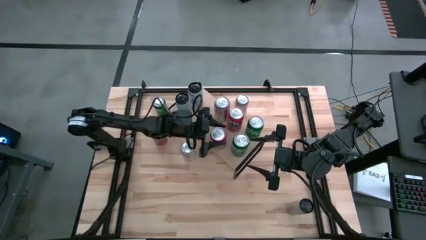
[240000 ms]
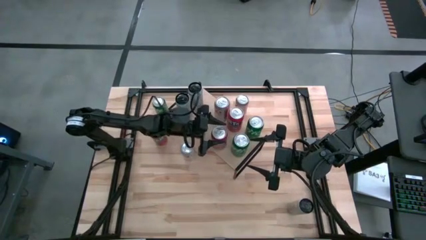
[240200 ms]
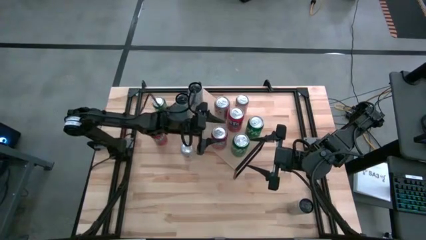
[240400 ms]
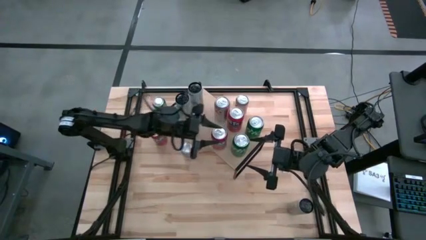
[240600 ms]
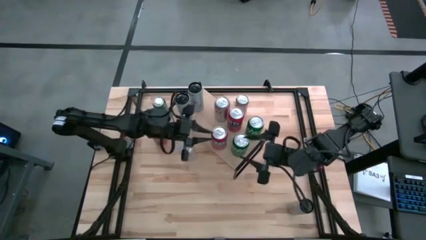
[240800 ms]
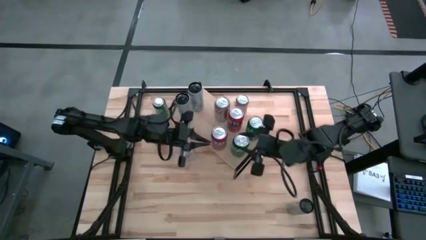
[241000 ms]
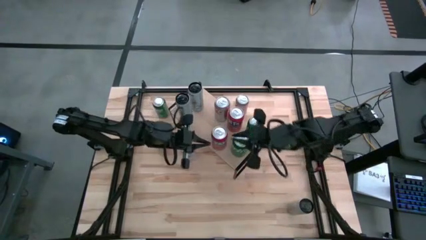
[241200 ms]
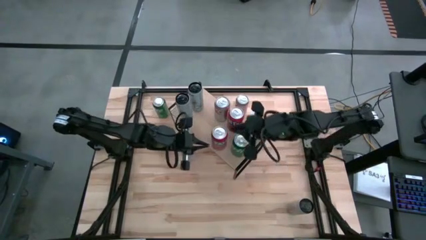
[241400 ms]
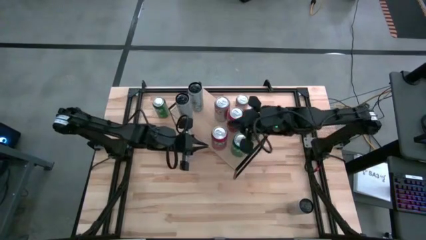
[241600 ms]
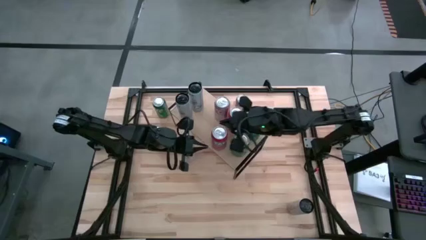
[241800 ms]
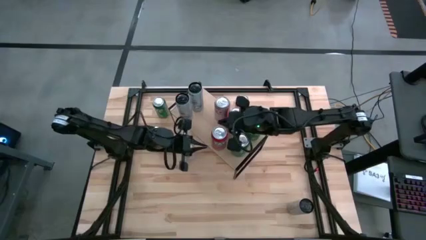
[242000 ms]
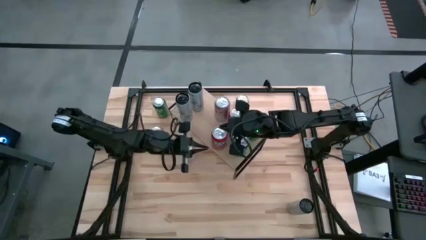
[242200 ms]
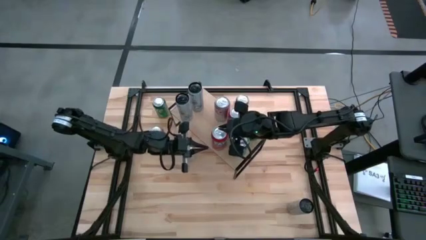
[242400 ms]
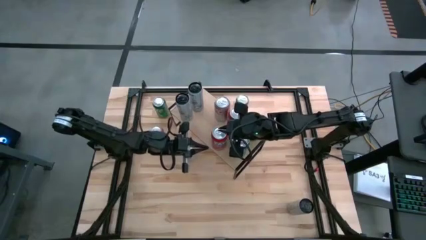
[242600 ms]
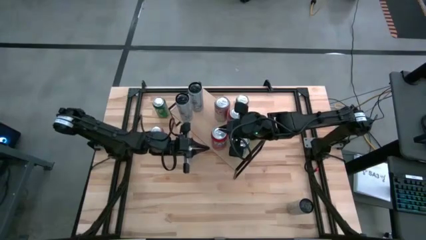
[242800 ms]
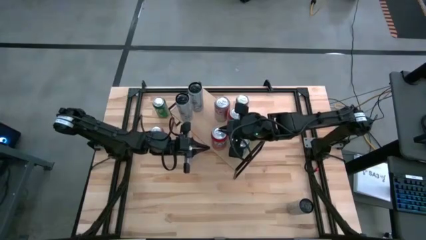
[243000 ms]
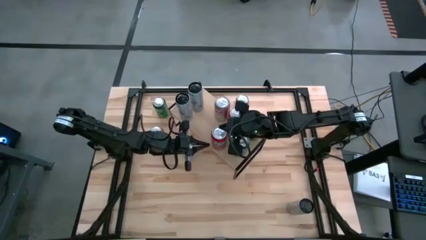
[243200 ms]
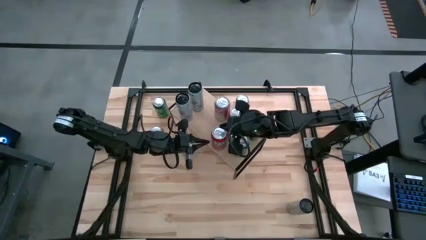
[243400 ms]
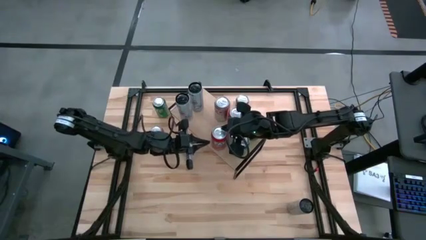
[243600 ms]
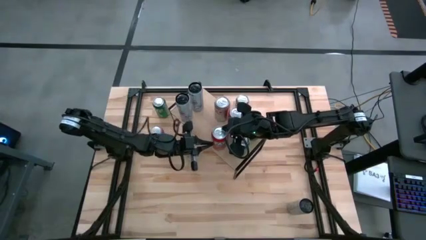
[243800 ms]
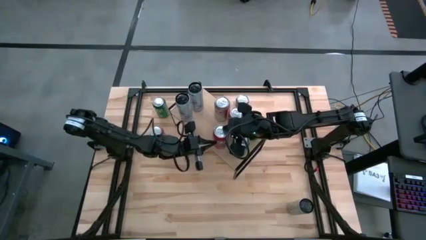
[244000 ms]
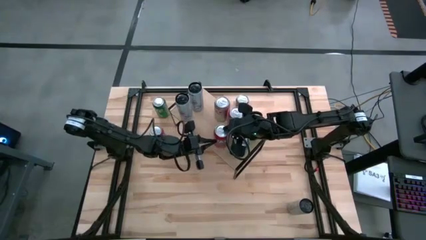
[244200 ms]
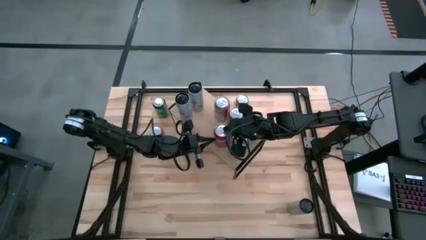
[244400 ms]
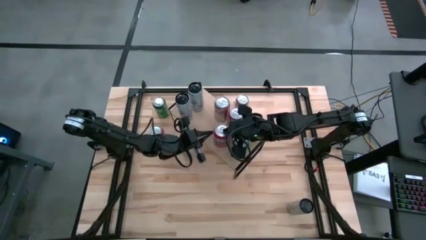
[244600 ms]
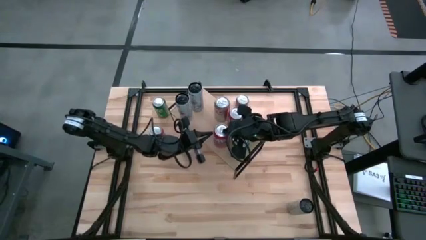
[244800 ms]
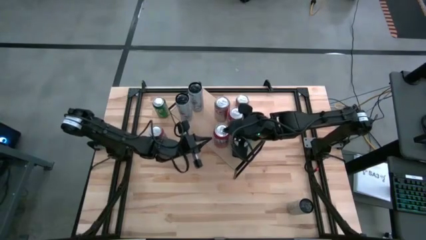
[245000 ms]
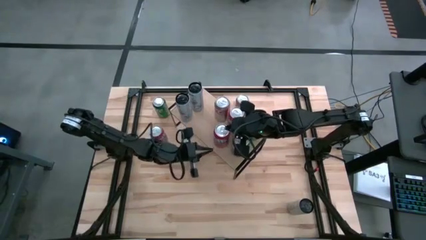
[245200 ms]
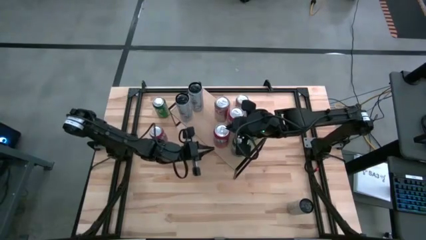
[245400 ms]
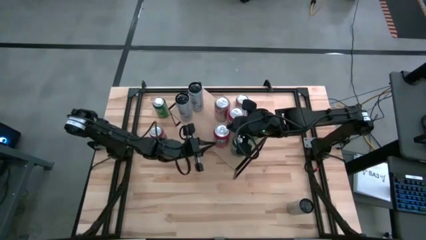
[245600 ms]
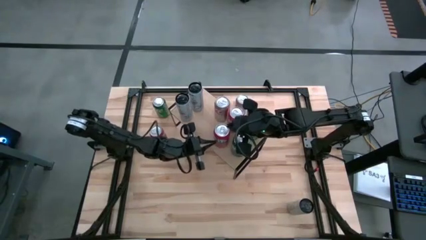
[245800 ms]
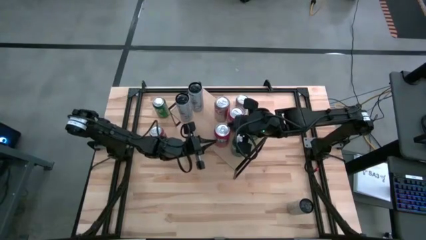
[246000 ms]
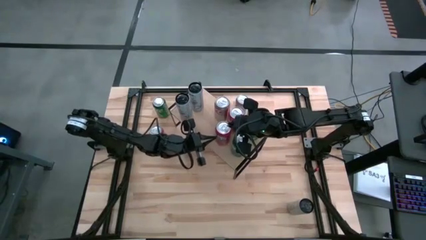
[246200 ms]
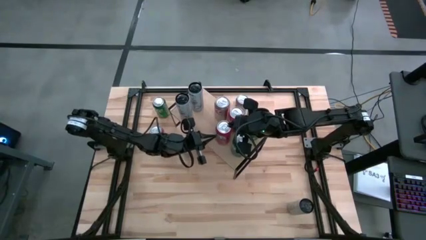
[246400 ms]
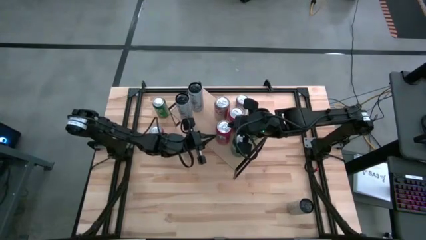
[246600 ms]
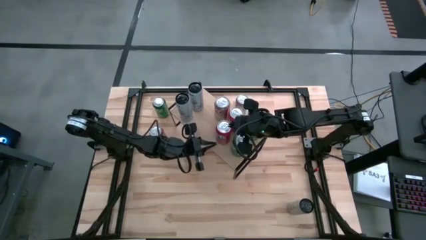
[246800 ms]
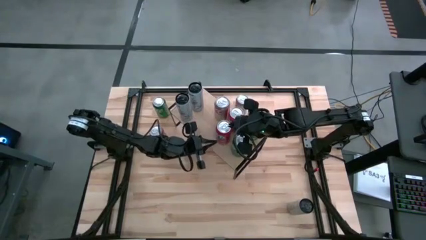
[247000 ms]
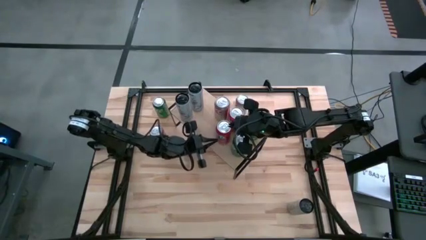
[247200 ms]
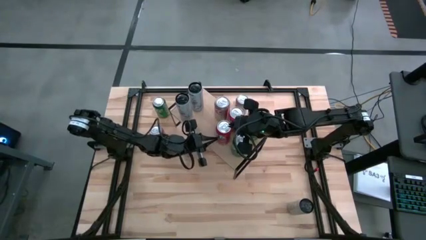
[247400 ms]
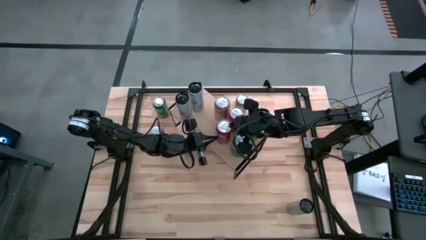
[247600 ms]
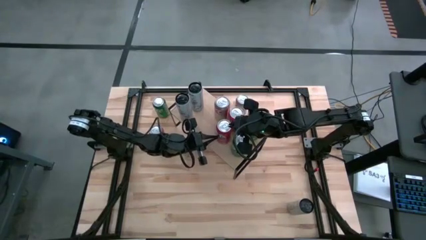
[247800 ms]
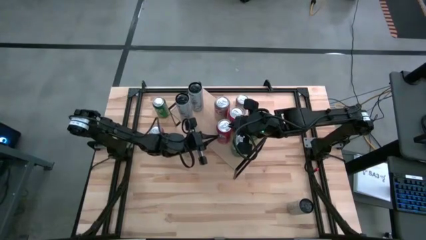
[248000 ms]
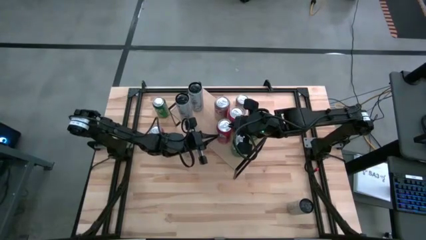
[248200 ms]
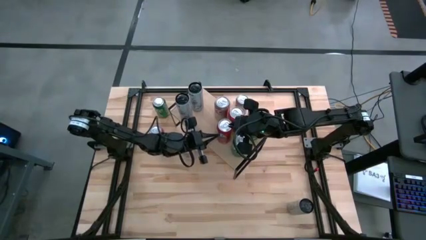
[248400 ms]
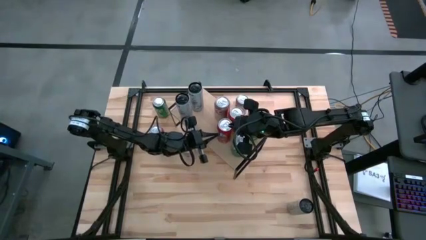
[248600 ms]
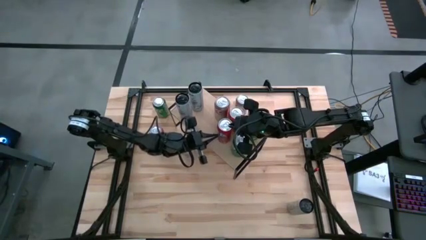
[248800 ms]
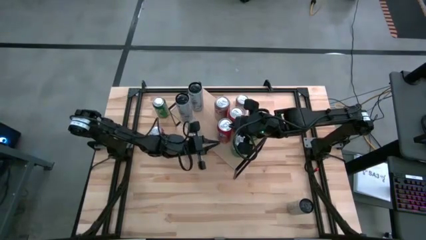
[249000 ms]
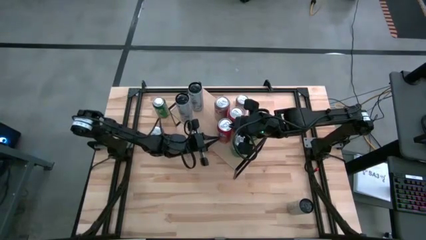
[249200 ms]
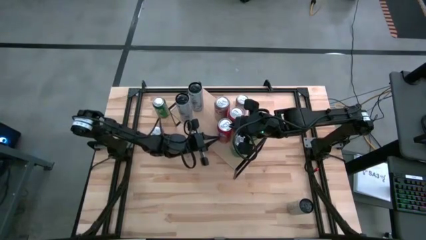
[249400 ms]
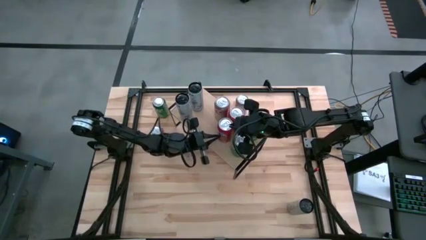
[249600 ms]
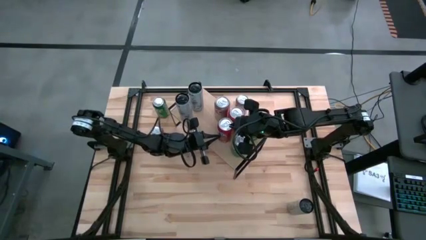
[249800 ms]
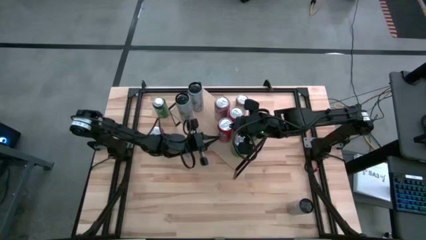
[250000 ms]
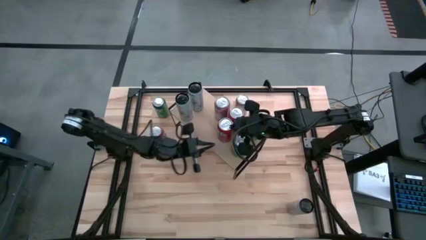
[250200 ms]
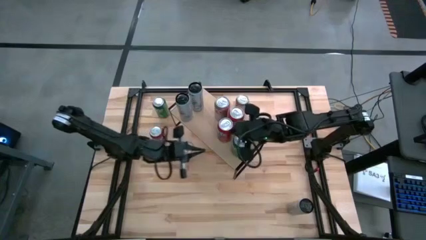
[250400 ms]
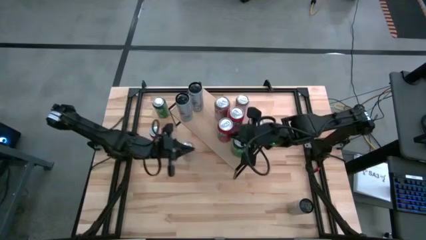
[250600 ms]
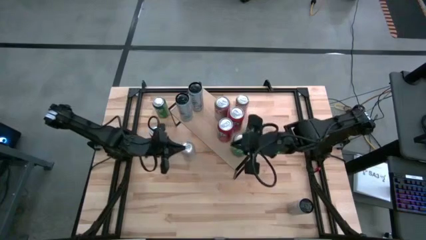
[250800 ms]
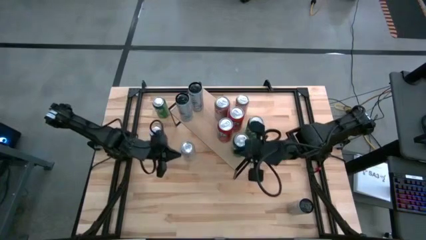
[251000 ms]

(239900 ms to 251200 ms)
Task: Place canned beverage on shelf
Put the right orange soda can on the shelf aligned with the other orange soda can

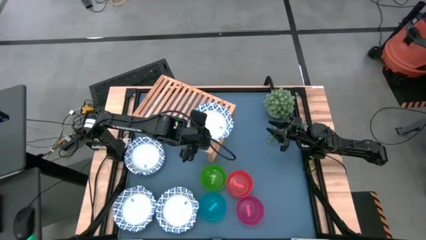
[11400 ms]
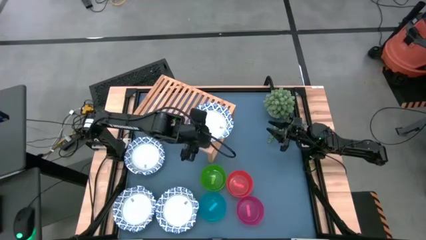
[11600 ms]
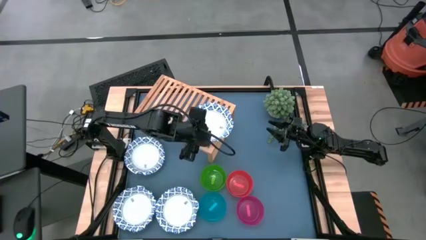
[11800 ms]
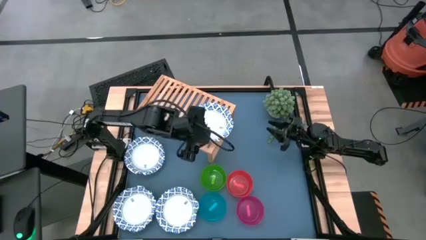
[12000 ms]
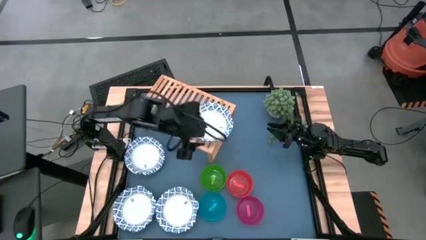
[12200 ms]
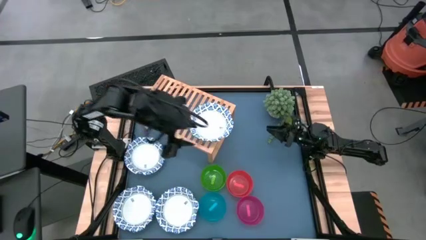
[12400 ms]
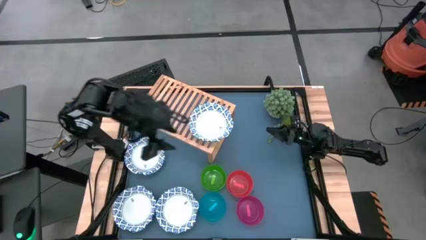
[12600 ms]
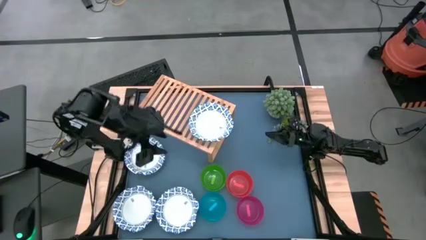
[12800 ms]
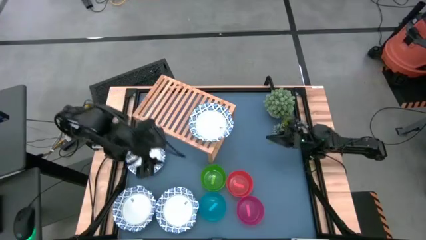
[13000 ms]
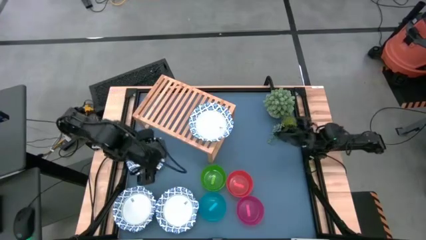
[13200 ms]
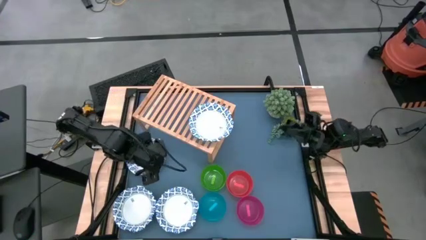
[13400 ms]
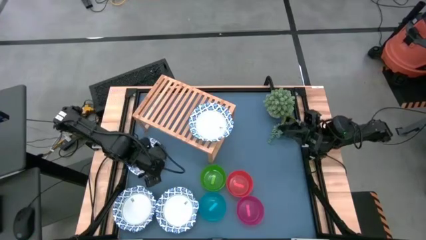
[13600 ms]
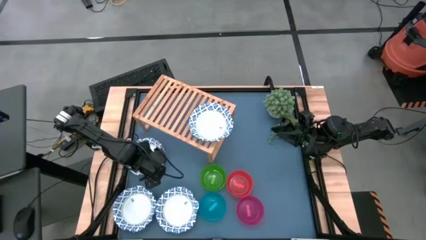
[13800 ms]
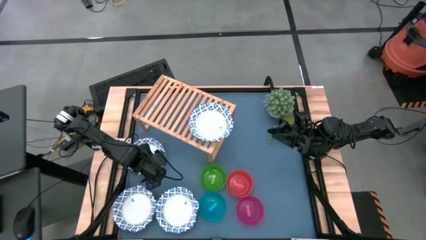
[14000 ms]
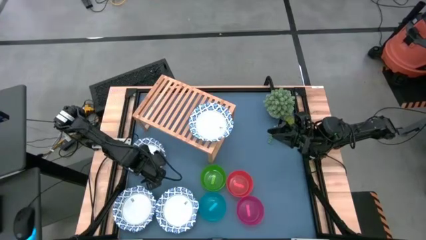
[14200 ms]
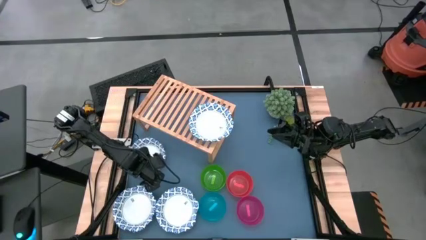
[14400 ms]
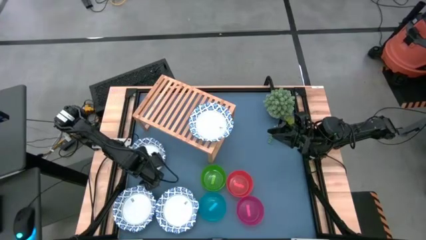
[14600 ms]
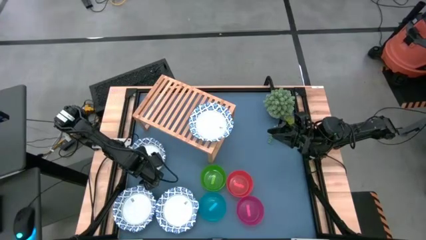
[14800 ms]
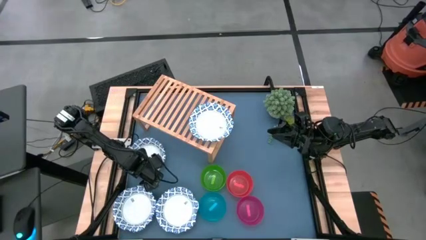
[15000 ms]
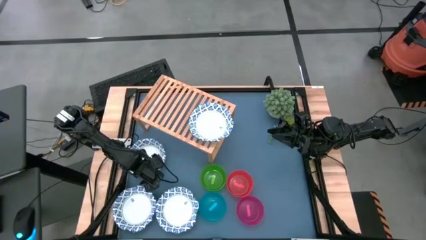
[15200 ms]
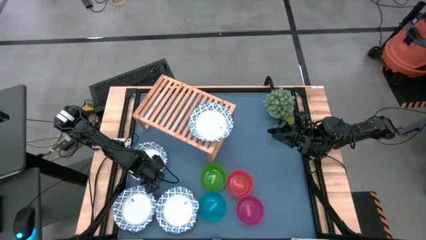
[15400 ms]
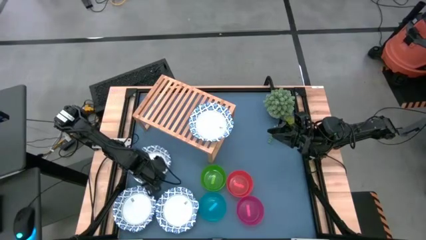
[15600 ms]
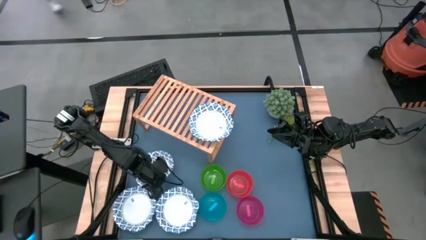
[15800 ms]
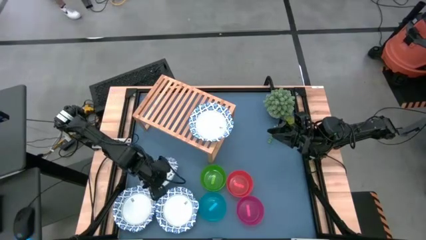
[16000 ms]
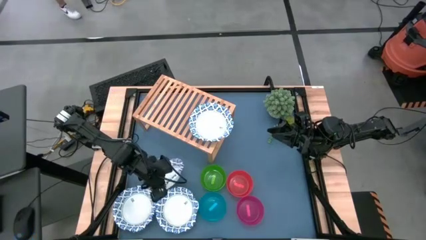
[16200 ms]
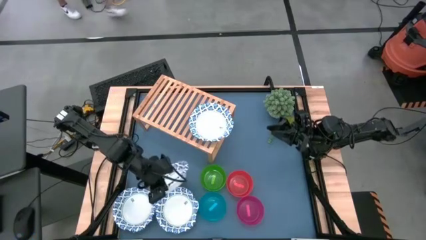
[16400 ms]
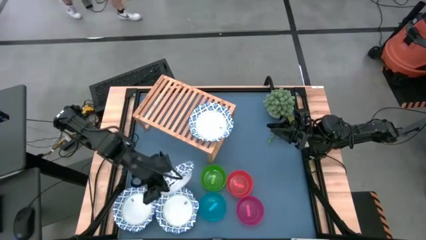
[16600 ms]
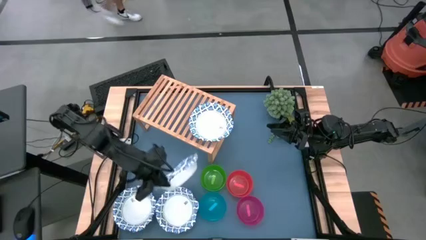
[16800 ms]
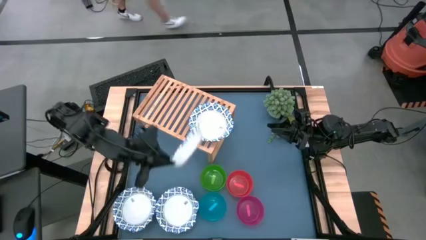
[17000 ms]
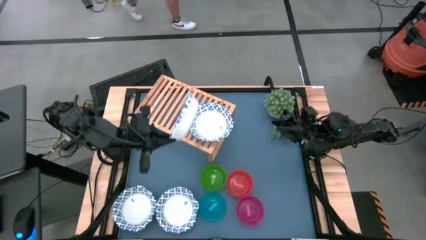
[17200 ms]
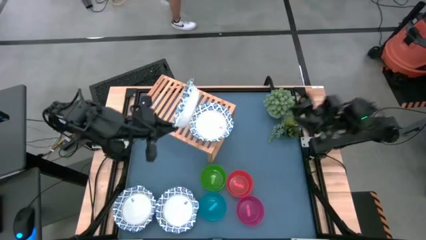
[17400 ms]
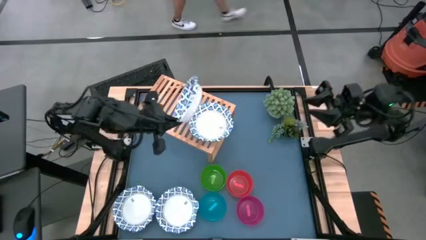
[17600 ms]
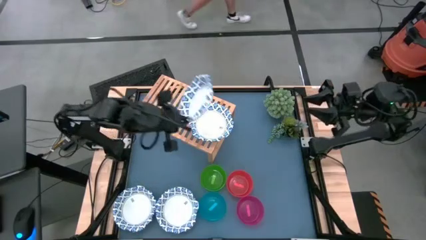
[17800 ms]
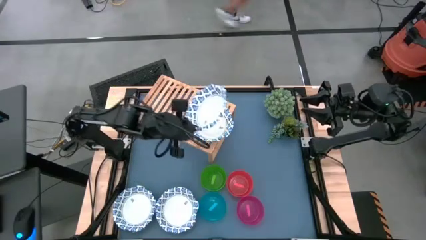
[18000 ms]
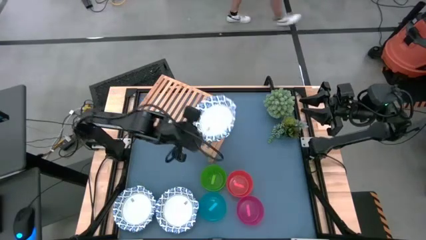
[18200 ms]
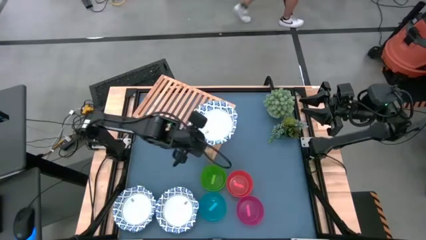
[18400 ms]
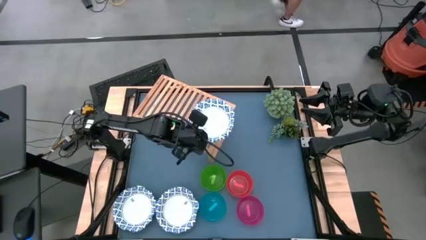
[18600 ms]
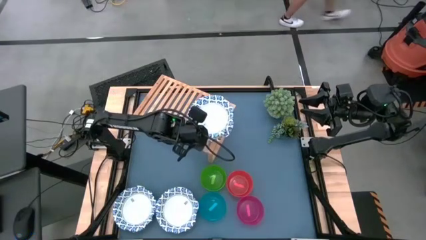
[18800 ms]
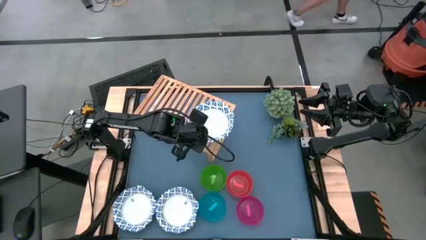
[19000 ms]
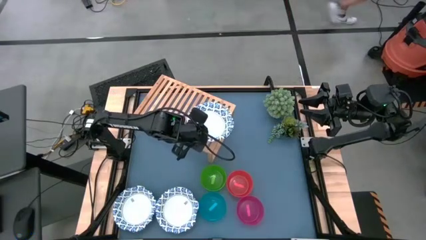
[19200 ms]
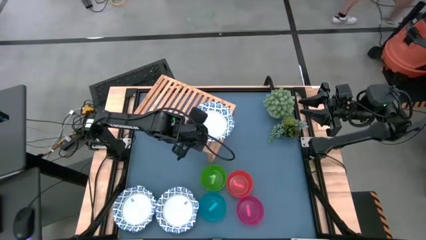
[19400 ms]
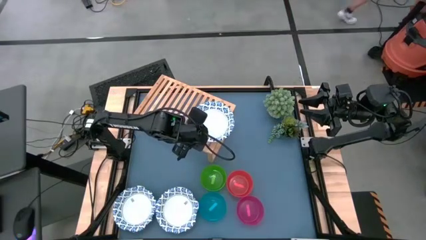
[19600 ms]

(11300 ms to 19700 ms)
Task: Place and stack bowls onto a shelf
Stack the blue and white bowl on top of the blue and white bowl on the shelf
